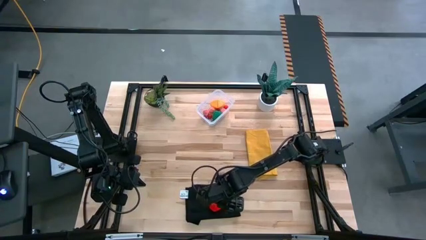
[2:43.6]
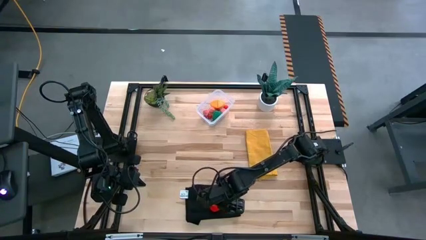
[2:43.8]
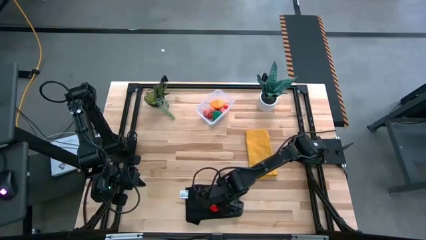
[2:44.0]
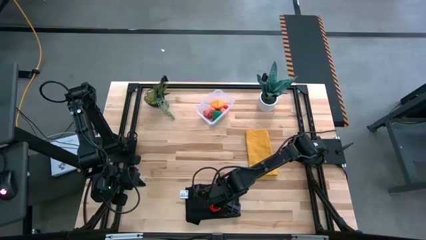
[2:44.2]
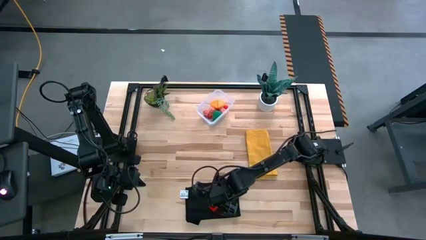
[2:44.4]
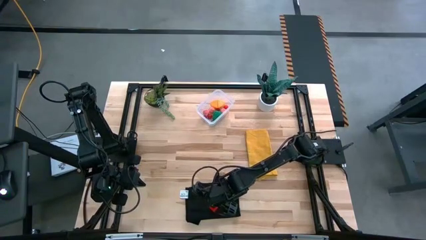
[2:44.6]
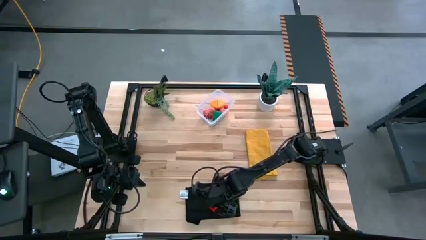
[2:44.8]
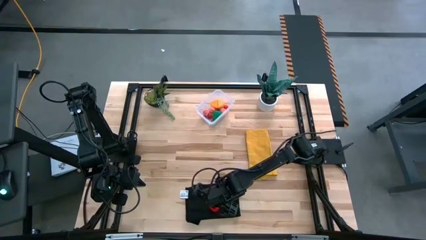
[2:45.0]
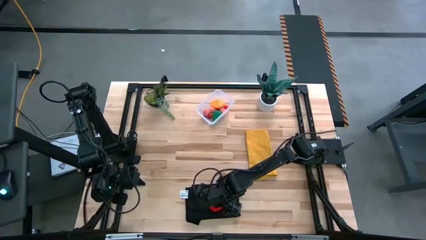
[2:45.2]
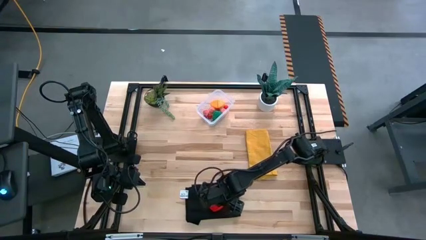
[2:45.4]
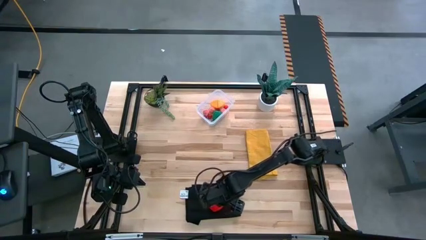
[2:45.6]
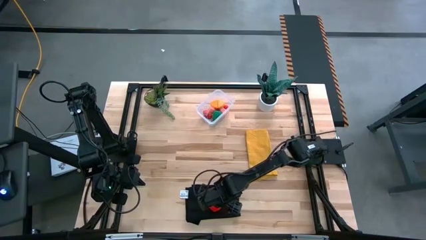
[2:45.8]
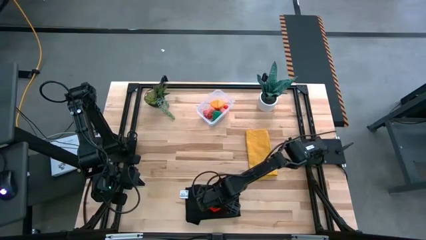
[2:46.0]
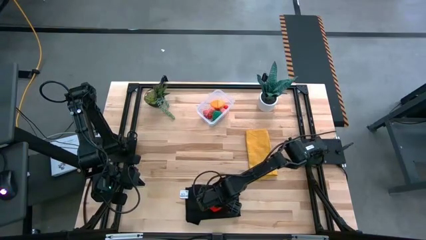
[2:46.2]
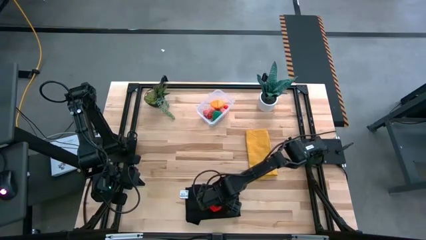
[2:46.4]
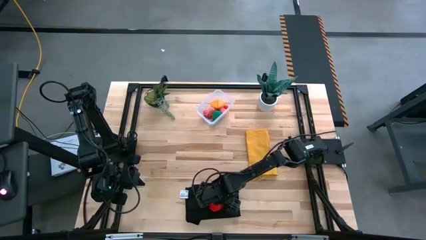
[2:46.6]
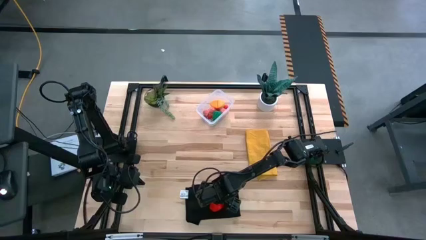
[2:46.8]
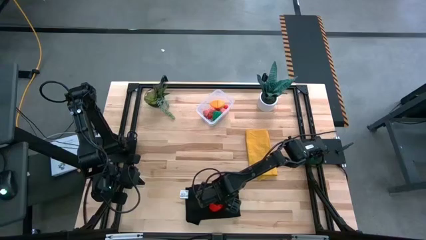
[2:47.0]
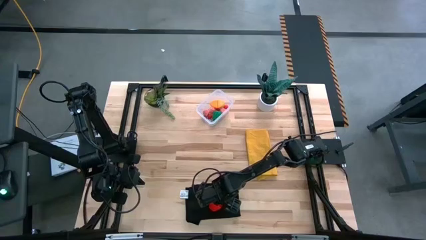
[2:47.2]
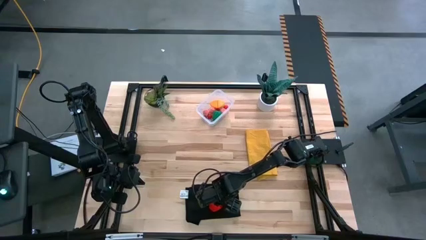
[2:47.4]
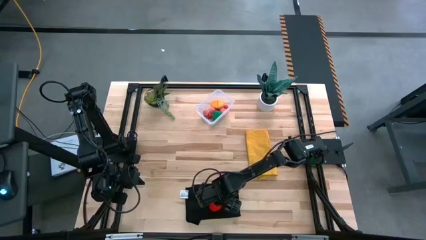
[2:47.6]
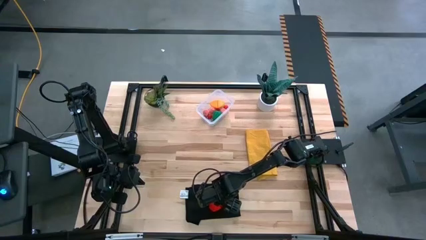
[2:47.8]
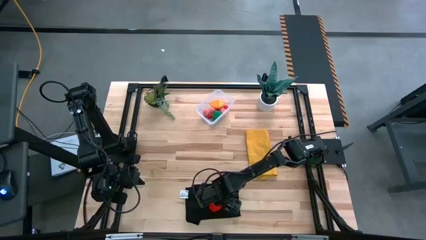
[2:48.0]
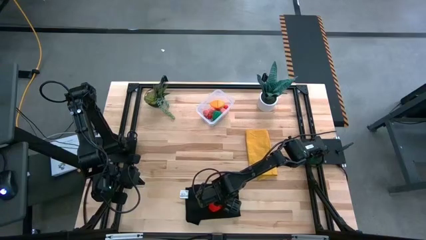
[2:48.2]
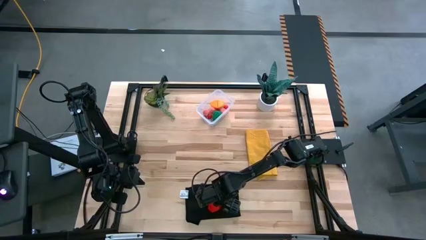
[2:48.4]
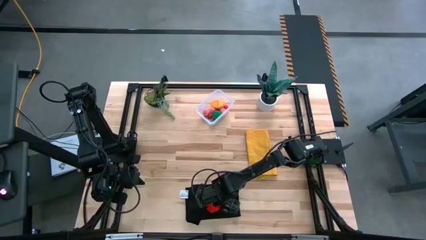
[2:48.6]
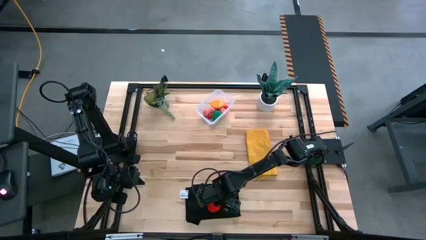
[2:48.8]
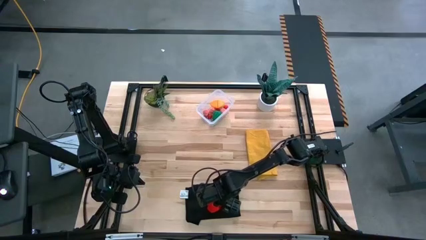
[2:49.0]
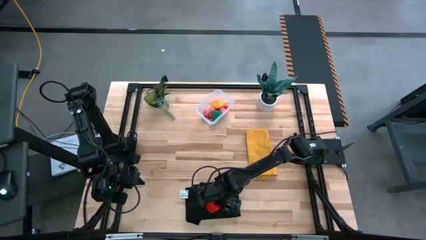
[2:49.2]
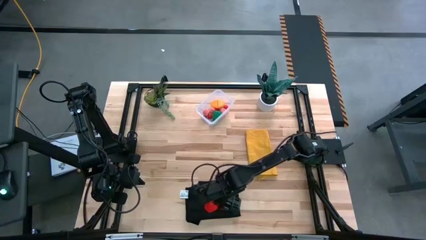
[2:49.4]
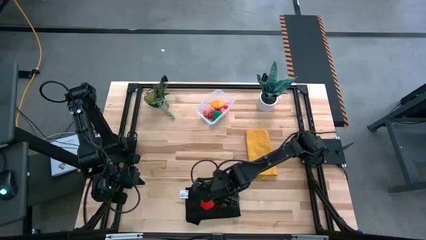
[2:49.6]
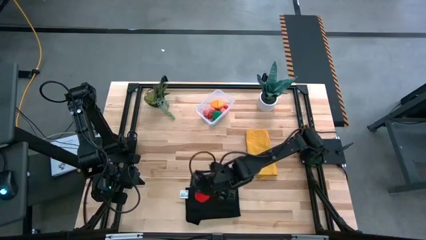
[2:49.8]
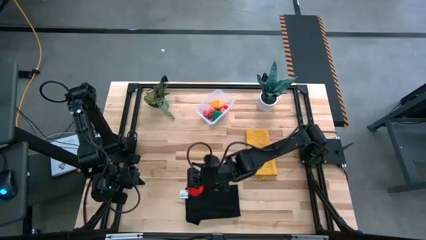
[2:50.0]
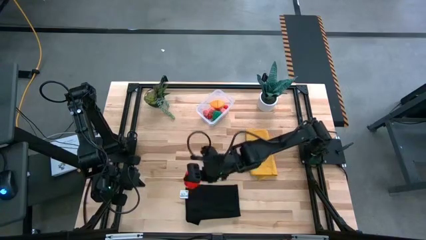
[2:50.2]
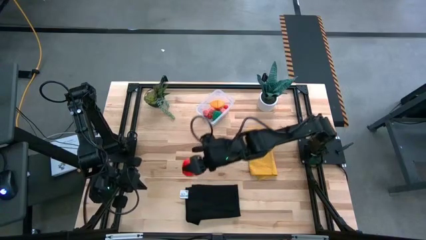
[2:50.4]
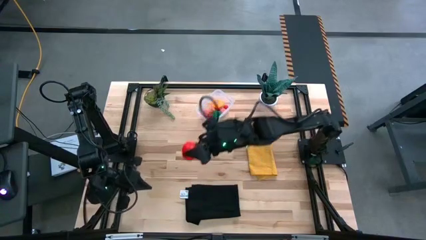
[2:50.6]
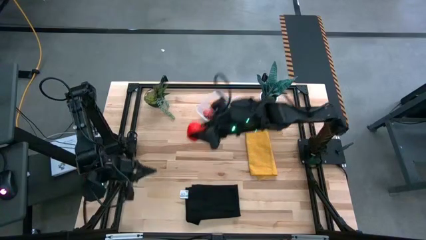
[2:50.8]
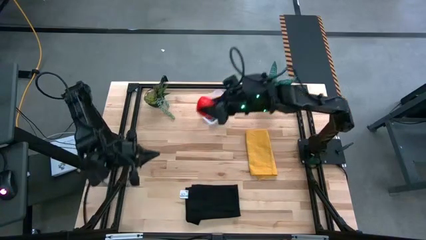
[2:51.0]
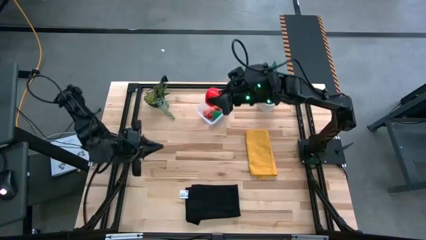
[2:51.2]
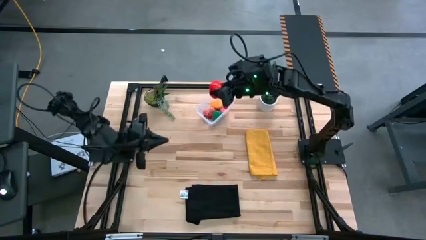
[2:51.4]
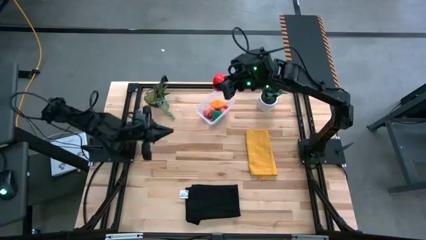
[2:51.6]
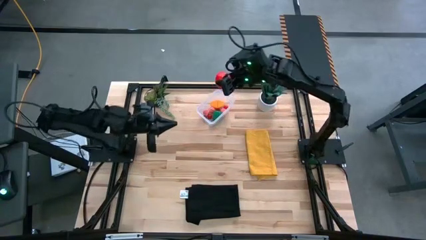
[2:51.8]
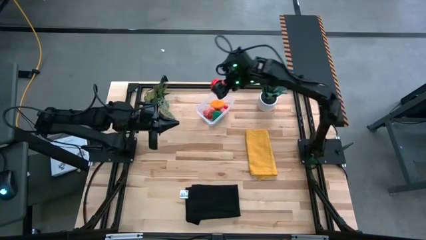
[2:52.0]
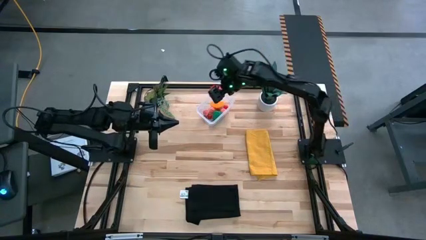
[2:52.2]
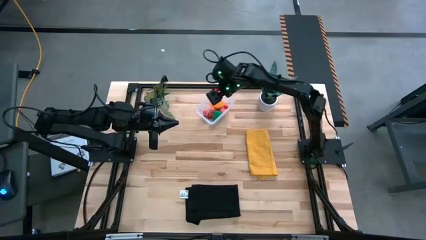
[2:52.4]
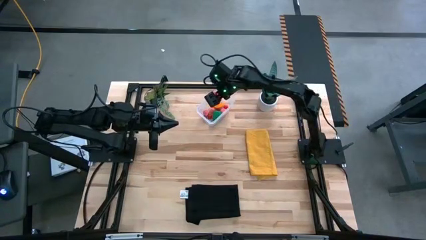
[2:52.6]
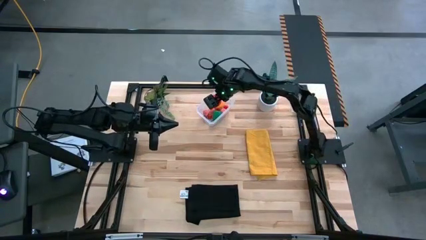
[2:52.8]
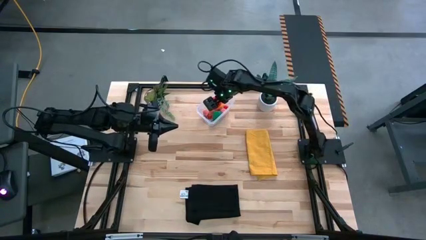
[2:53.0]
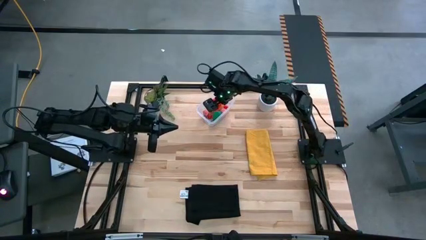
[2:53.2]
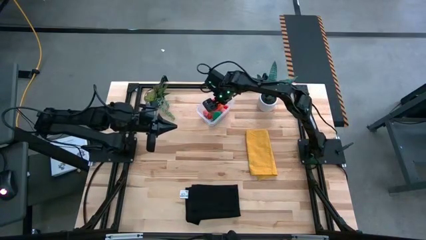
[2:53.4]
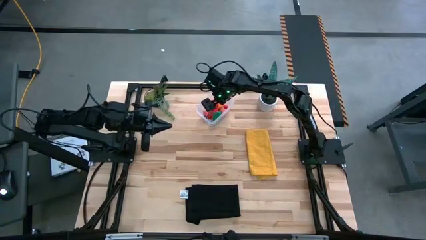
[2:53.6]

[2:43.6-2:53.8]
Task: Pick and placing Produce into tupperware
Put the red apple into the transparent bin
